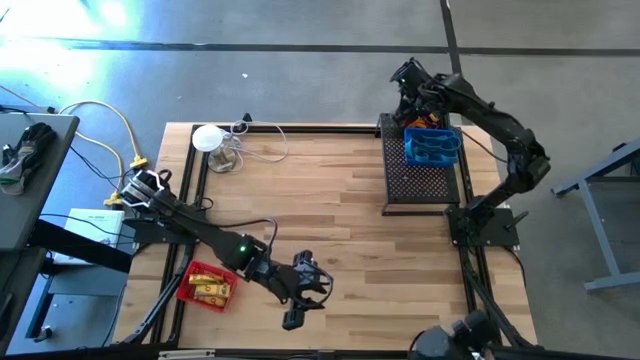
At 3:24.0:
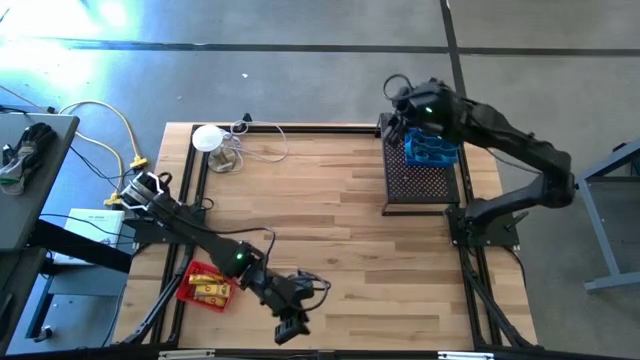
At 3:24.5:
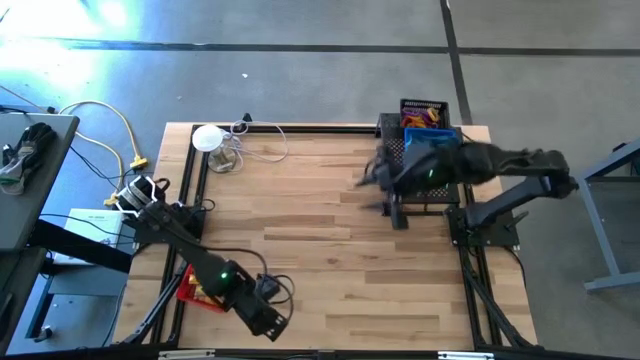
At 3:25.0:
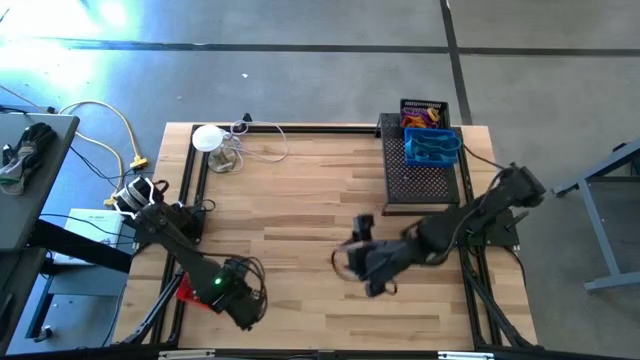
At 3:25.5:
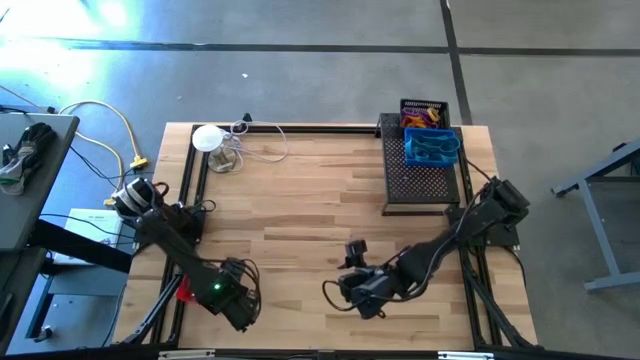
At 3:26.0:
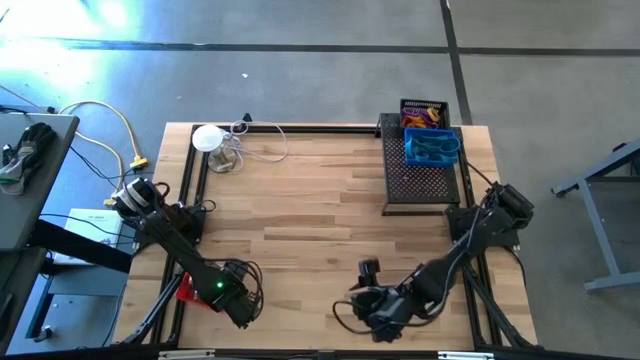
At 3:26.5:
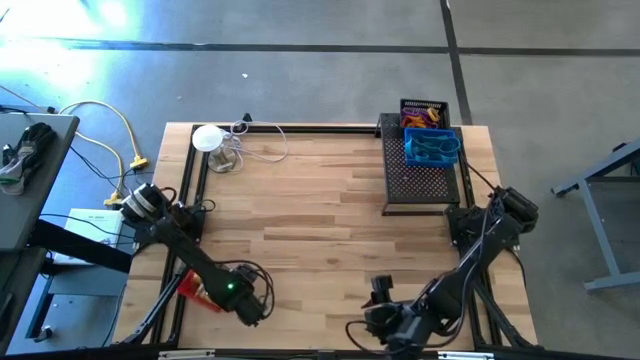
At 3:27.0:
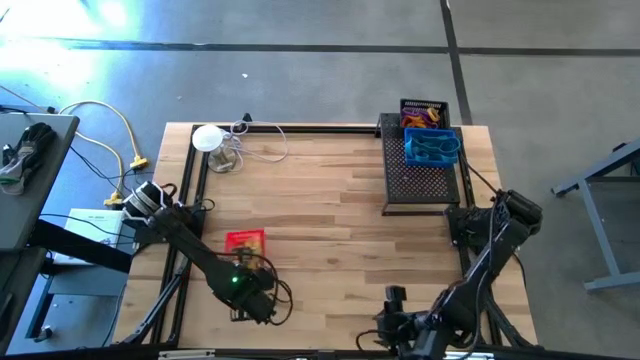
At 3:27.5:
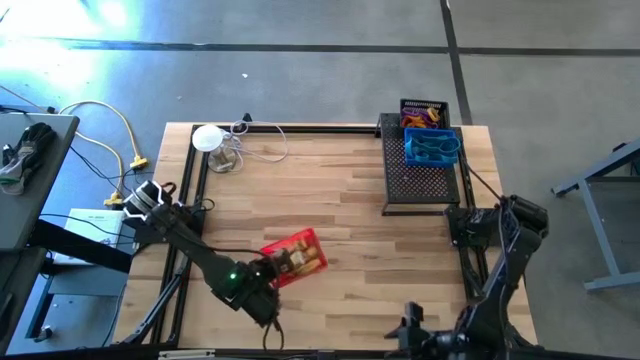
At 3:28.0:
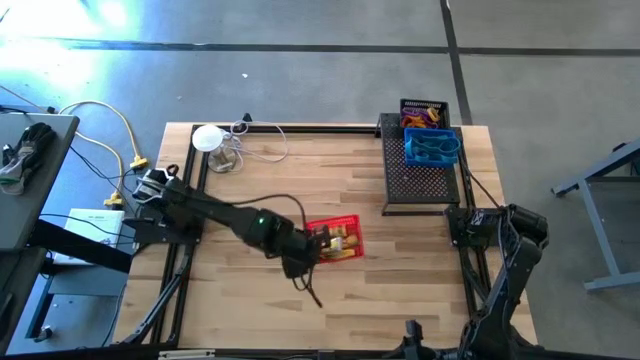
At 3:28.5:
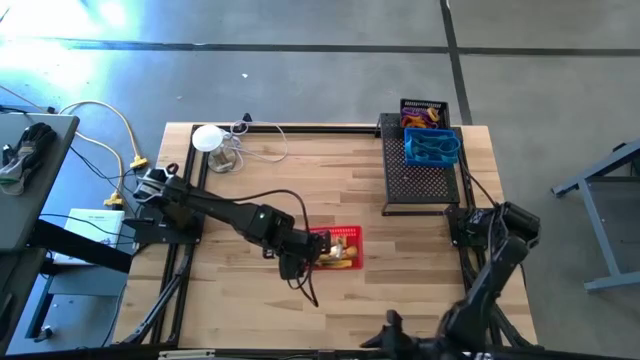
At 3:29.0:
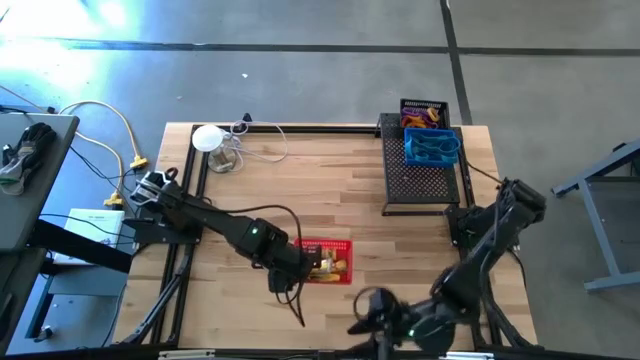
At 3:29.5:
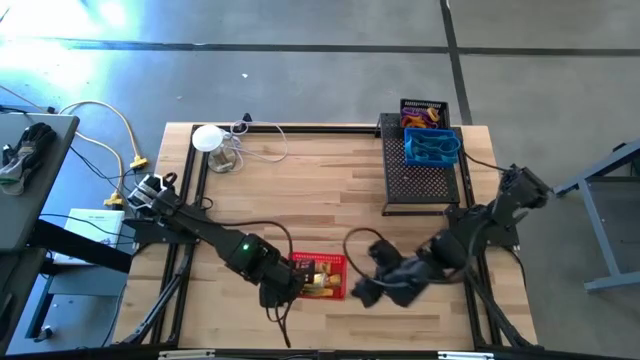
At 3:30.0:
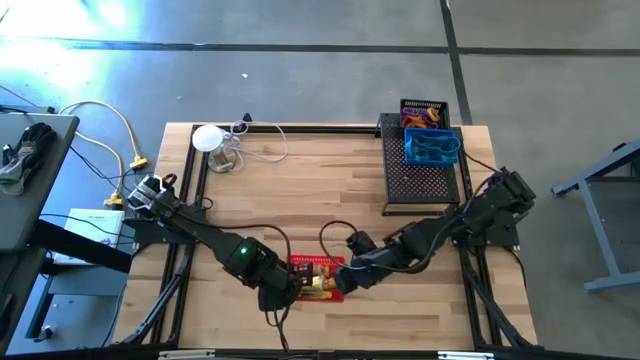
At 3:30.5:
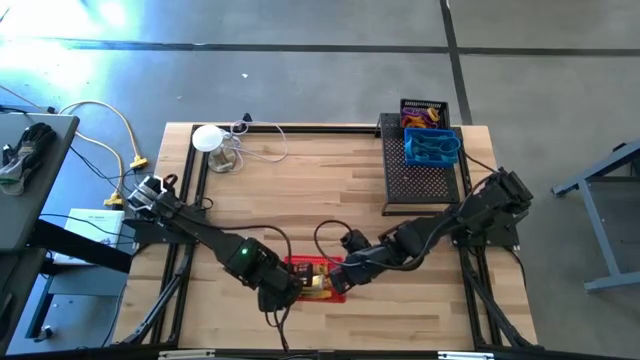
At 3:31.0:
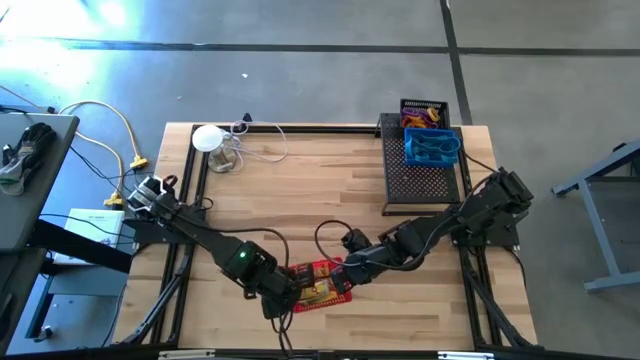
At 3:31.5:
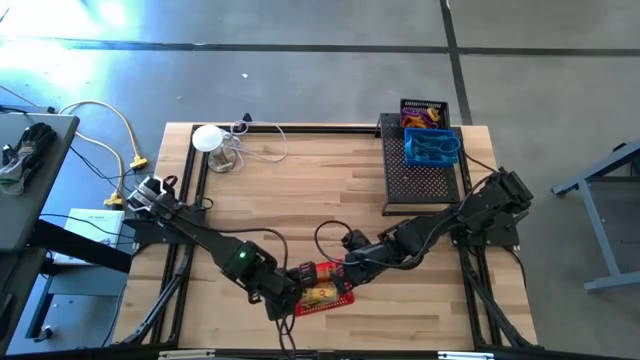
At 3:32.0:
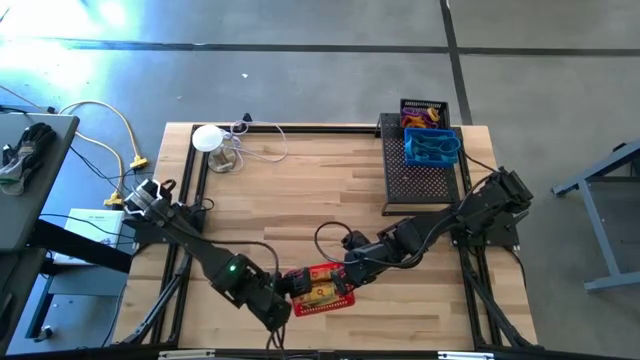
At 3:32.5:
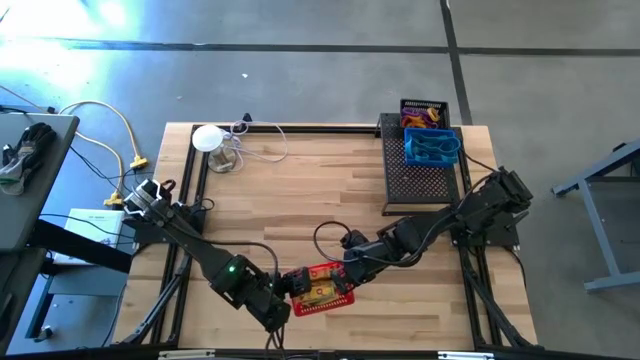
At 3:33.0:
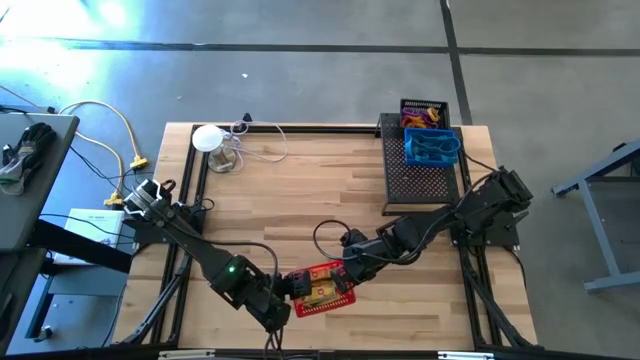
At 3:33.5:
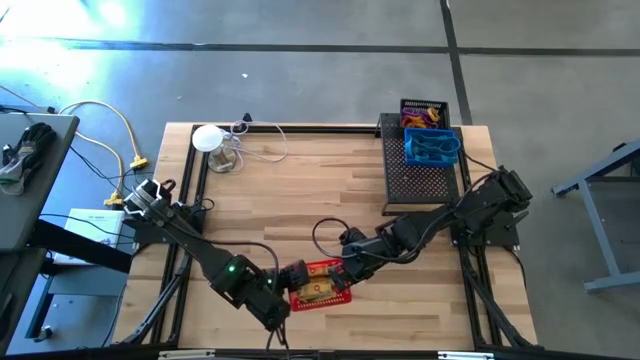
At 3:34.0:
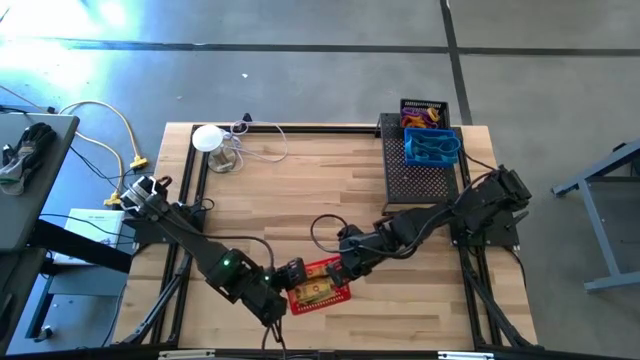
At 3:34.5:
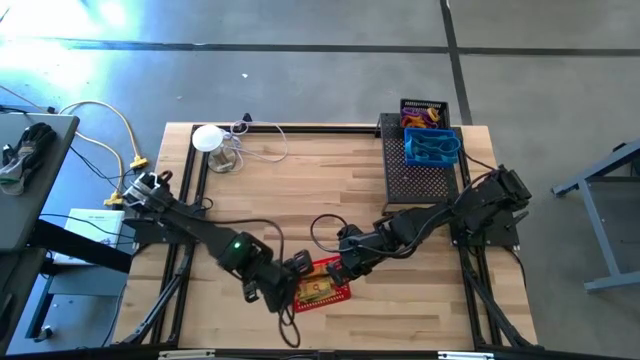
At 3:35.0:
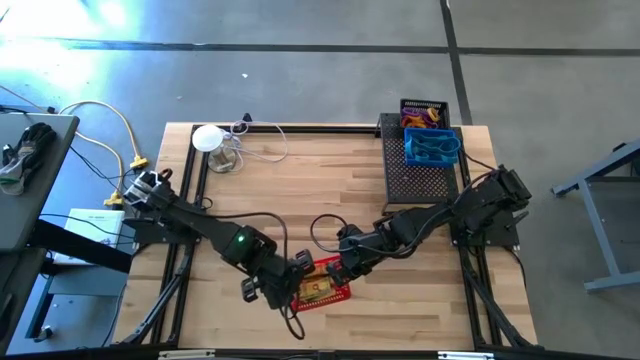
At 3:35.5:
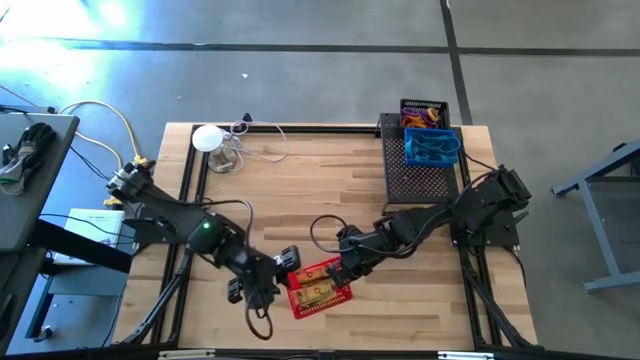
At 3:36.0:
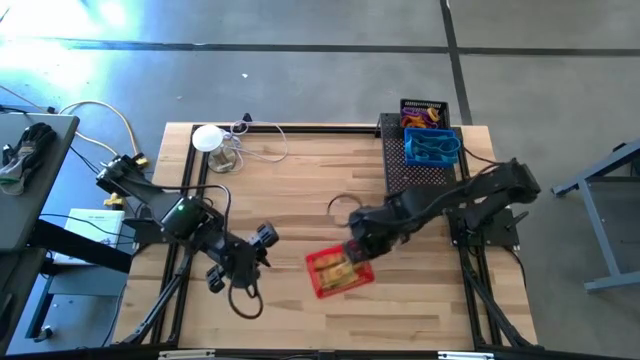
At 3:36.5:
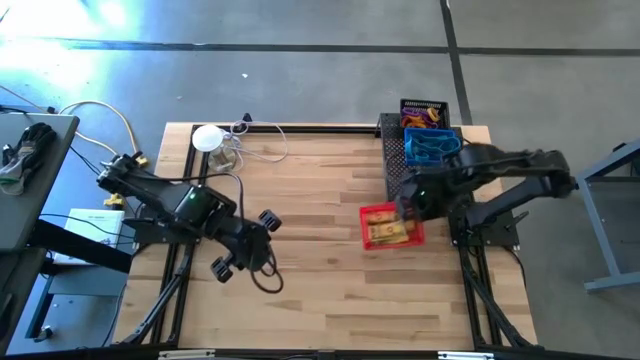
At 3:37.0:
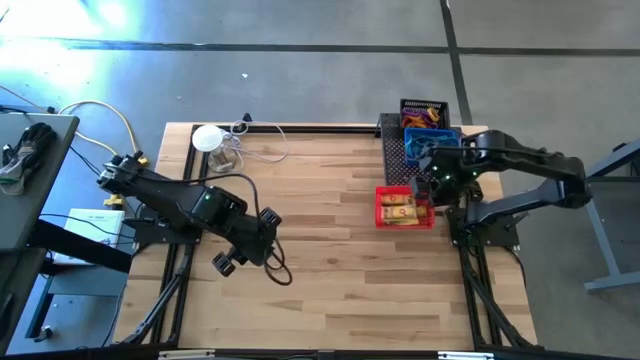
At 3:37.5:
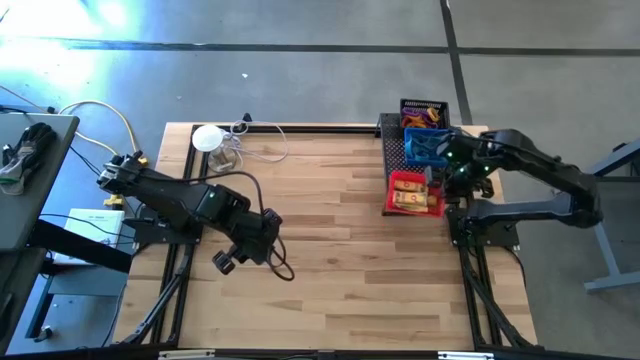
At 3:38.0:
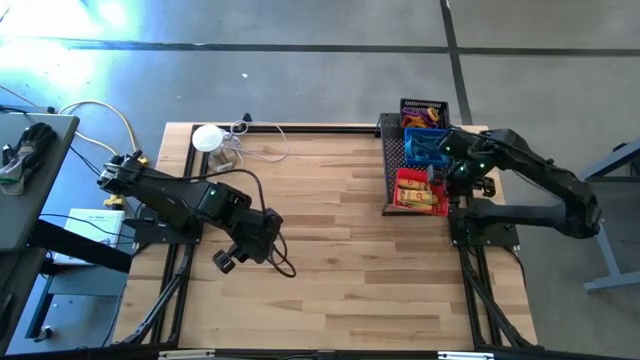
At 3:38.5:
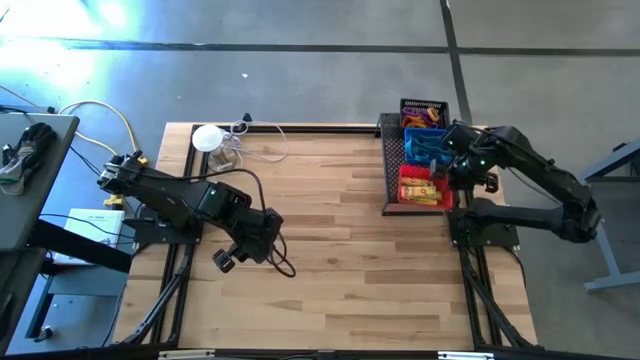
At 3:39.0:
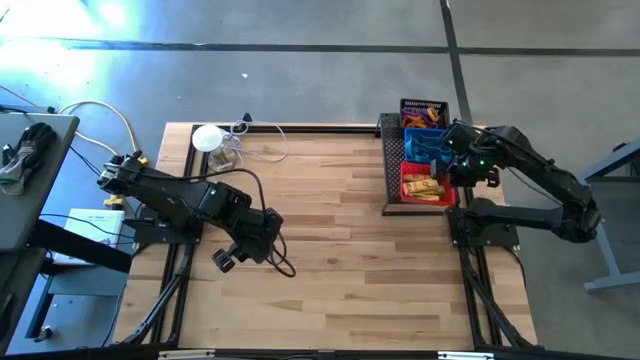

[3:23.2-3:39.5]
Task: Pick & Place Office Desk Supplies
Put the red bin on the shelf

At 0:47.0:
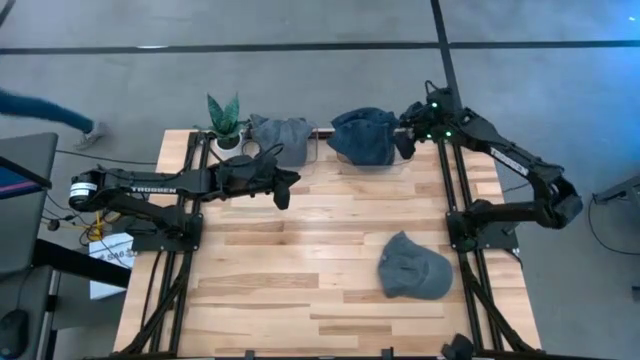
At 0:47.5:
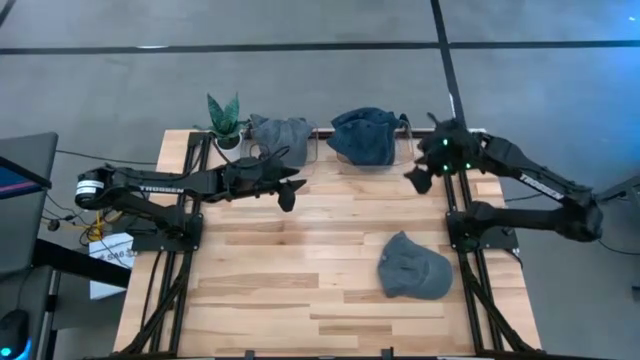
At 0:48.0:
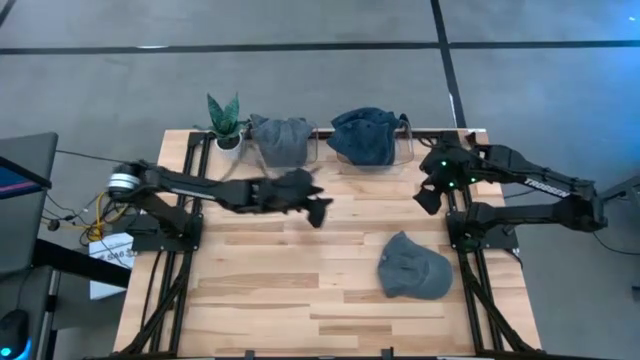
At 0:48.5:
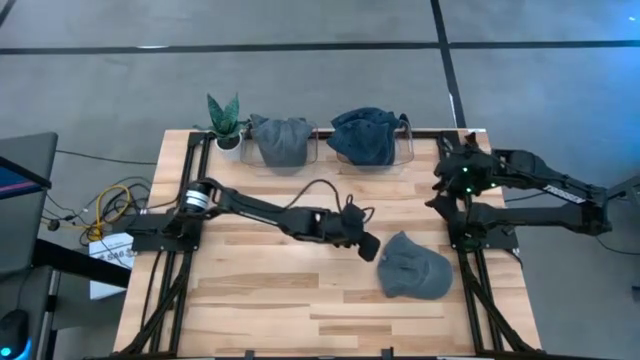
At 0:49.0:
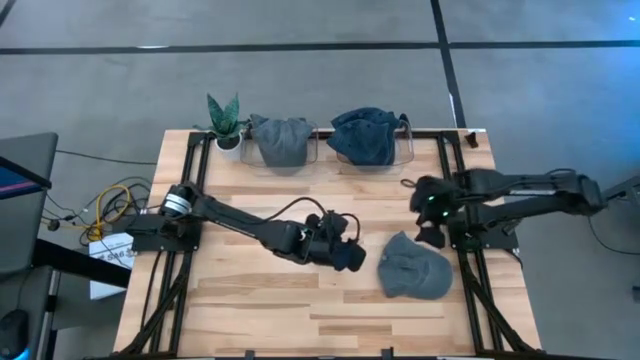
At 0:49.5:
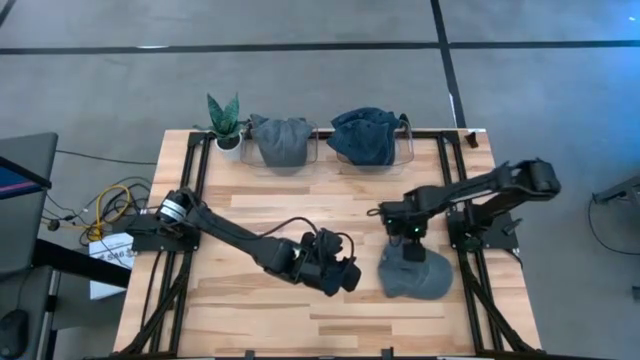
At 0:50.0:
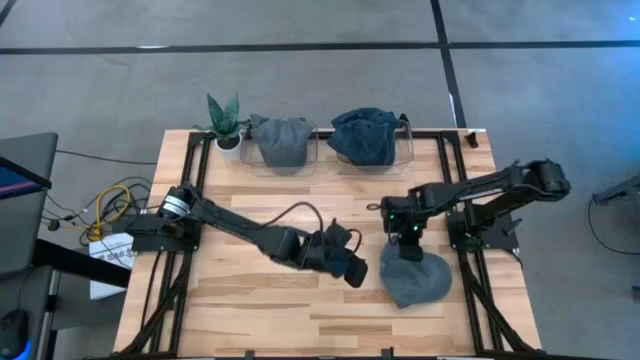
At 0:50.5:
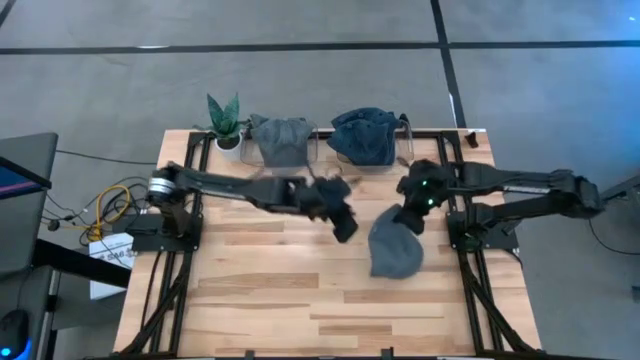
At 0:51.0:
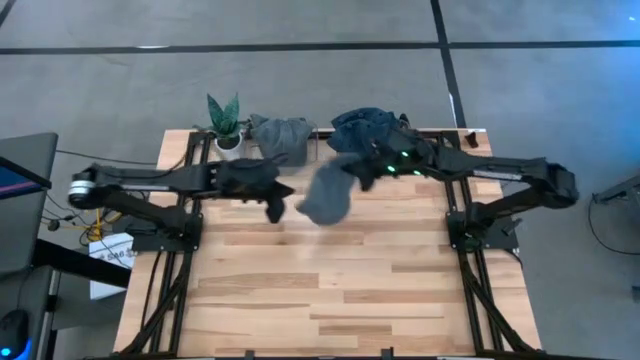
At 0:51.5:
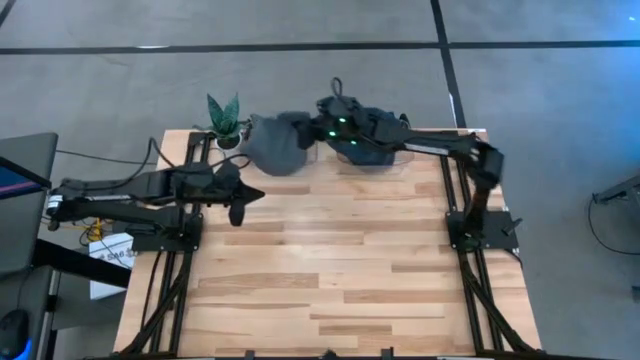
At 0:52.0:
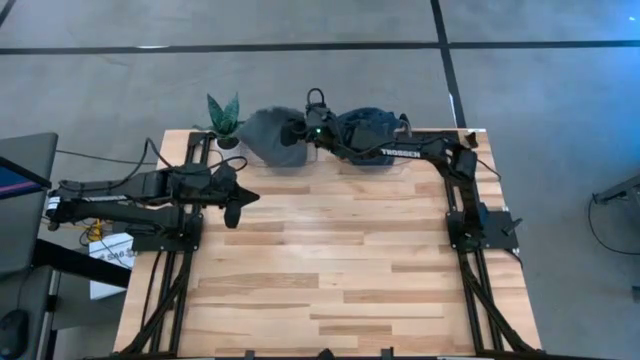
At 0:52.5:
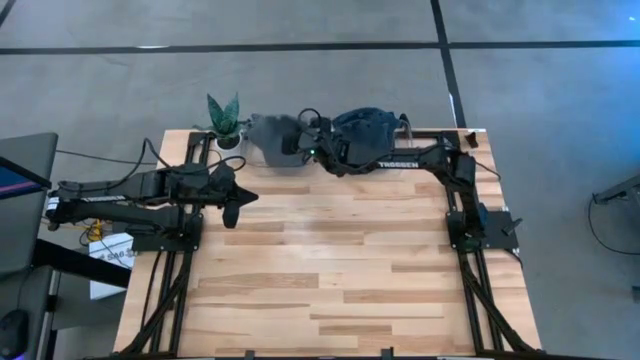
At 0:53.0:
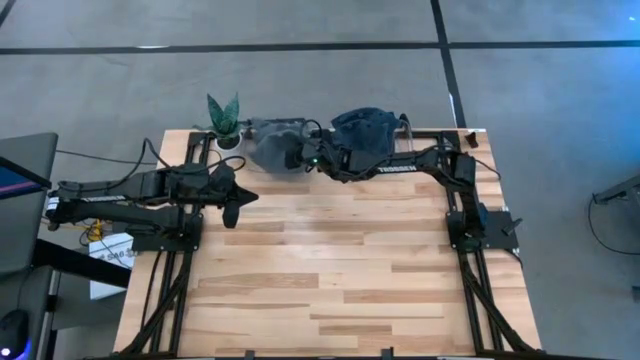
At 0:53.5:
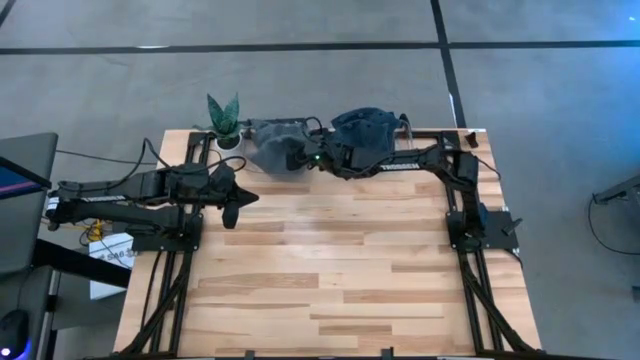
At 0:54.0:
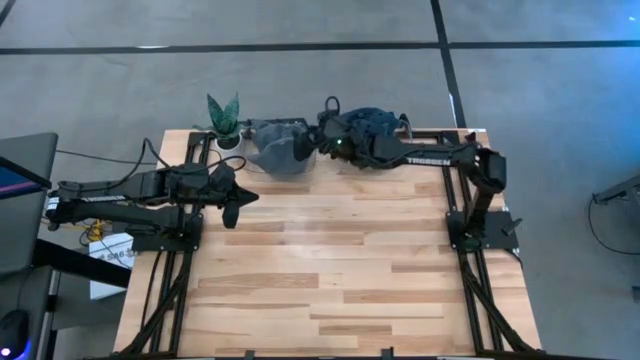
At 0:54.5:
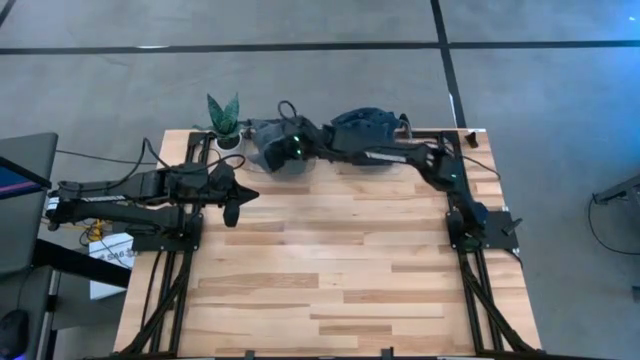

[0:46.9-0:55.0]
Task: Pick & Place hat
Put the gray cap into the left transparent bin
